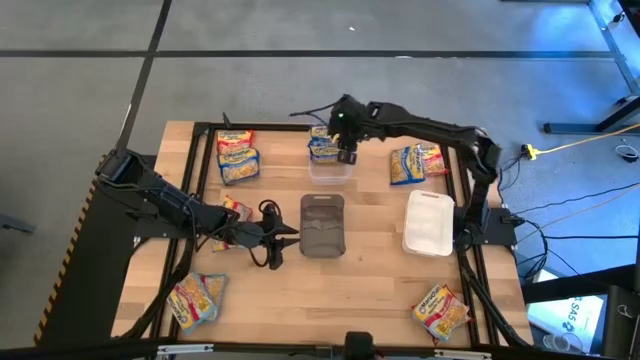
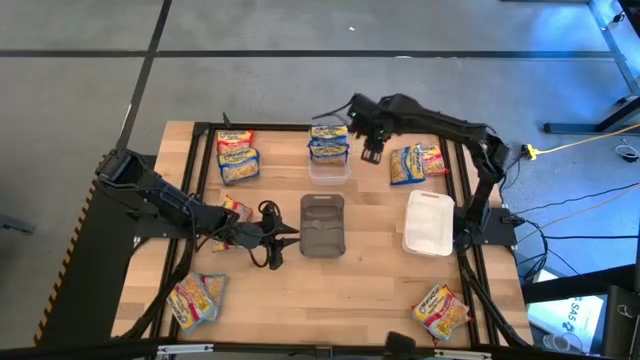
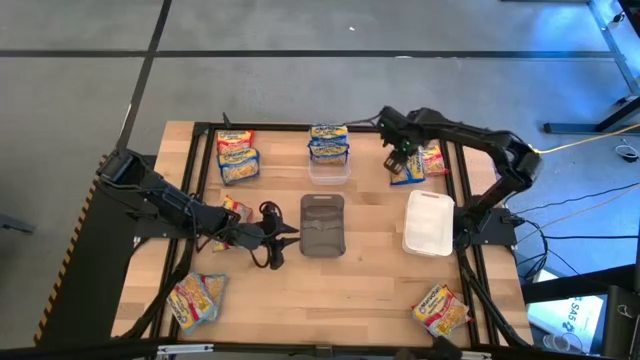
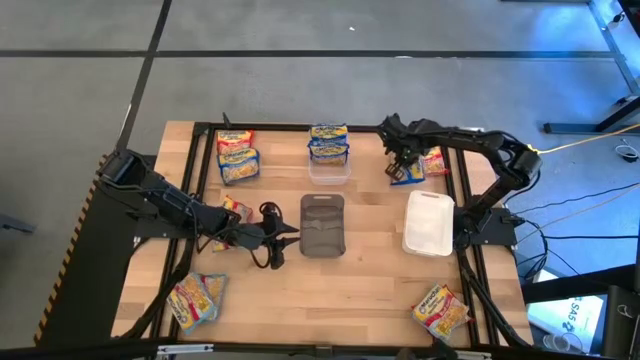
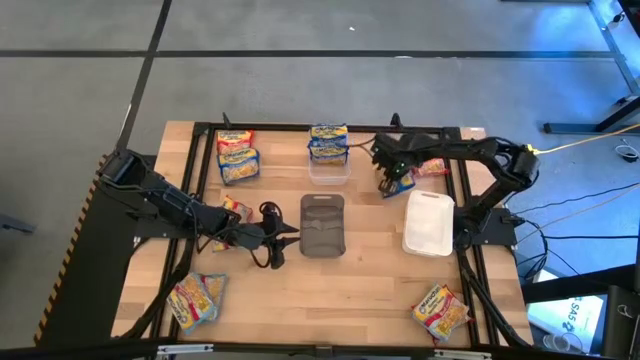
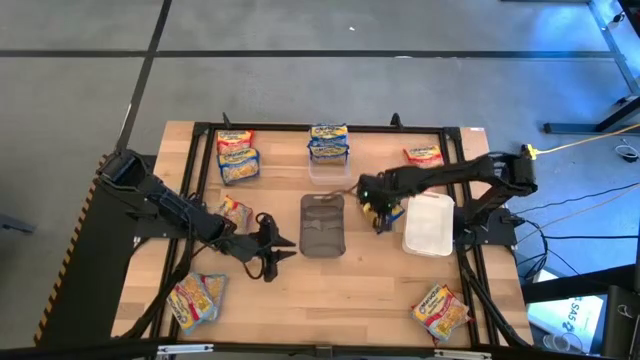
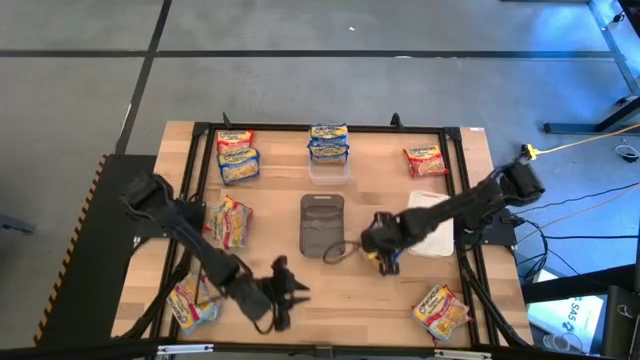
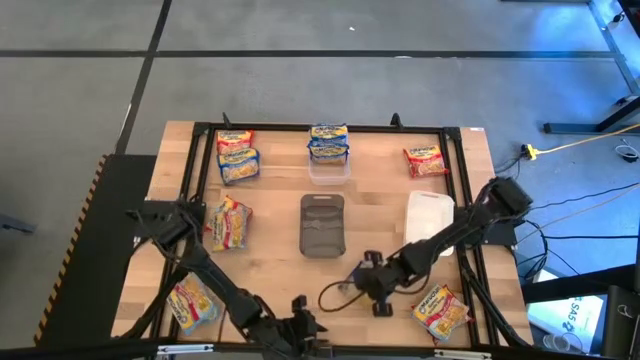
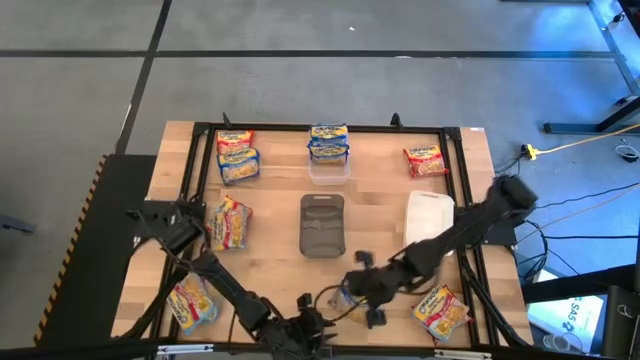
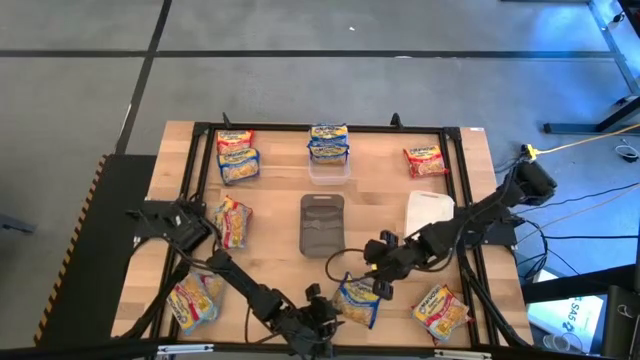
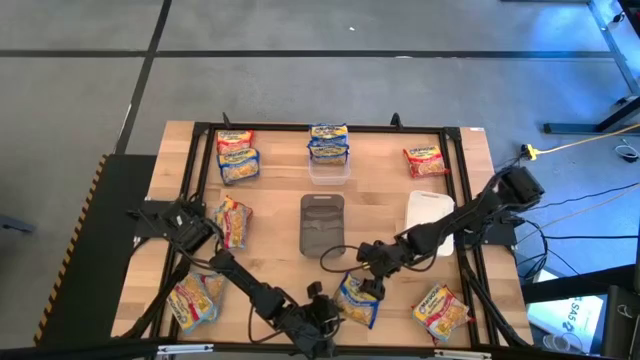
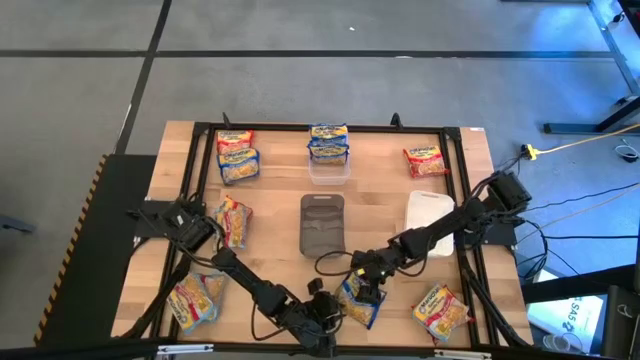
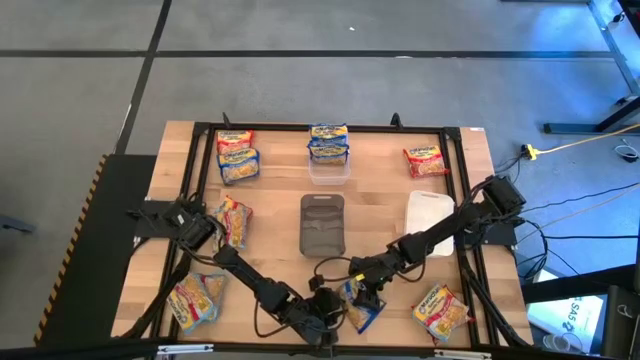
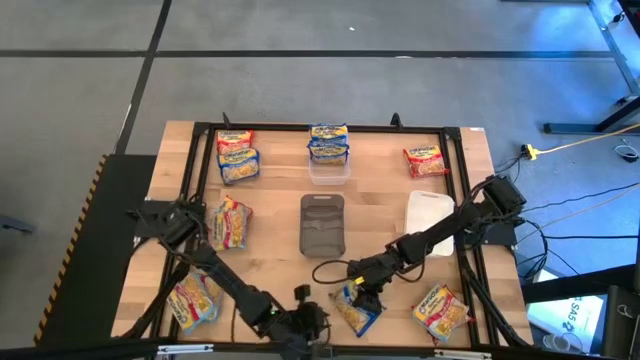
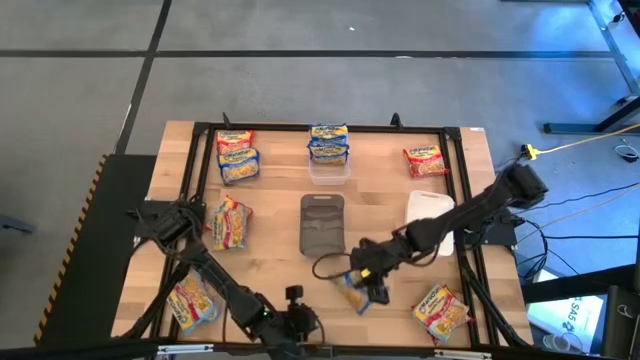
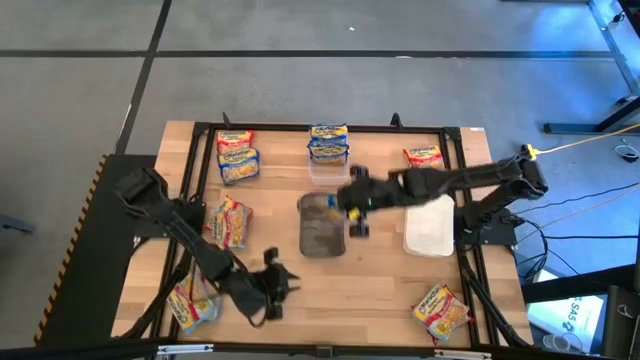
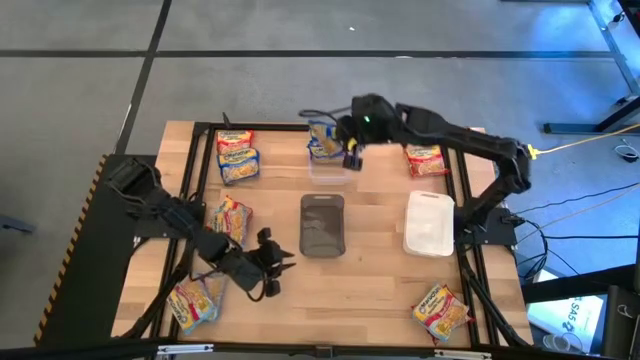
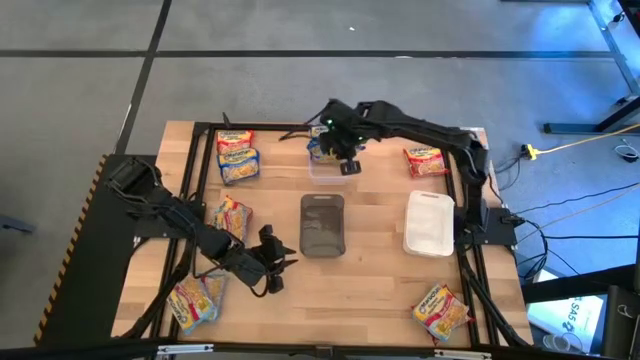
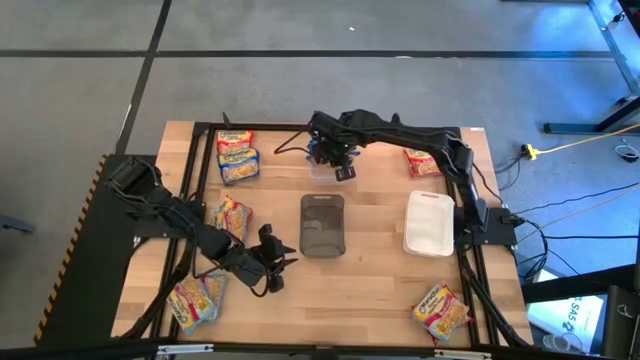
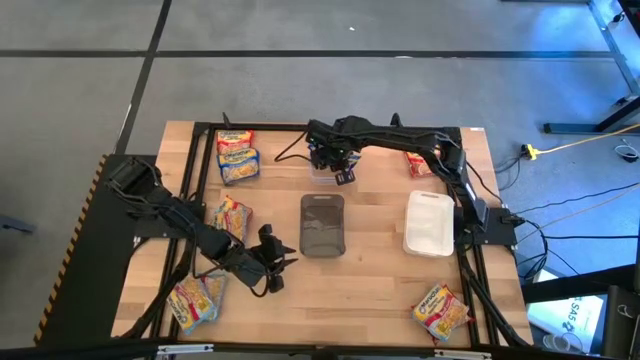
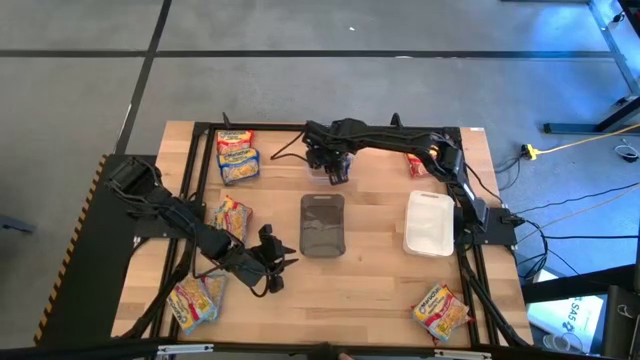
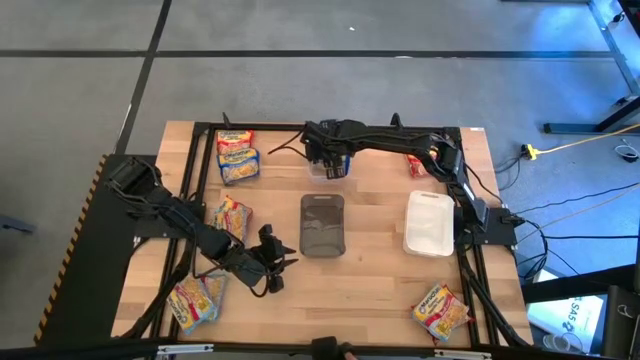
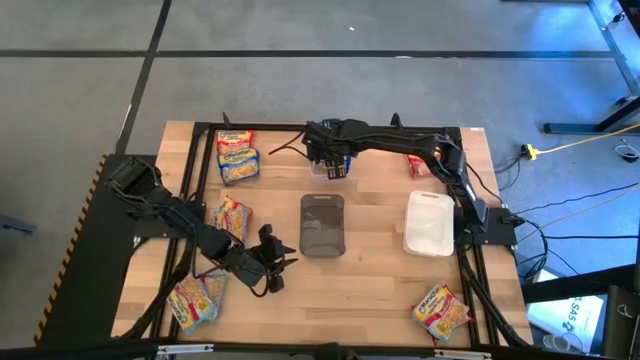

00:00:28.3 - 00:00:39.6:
Task: Sort Maruchan noodles
Put the blue noodle pack into the transparent bin

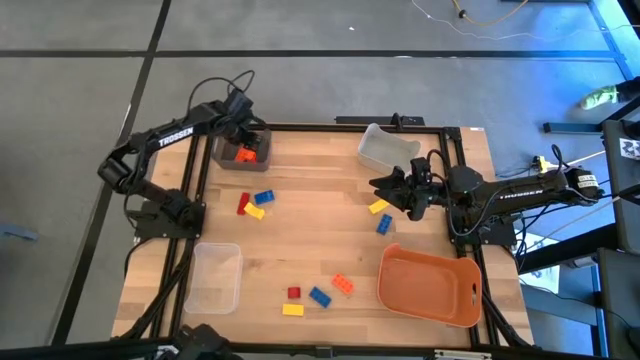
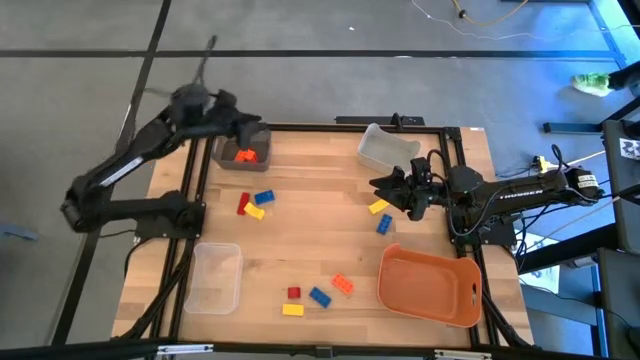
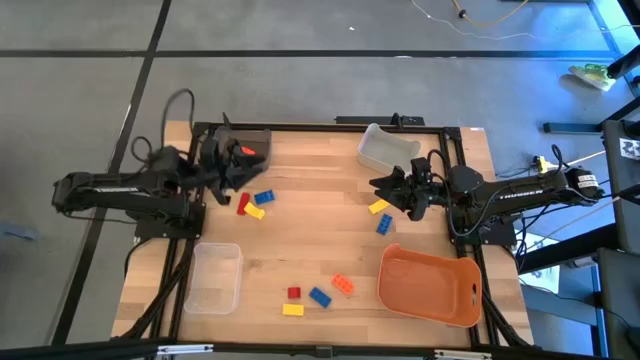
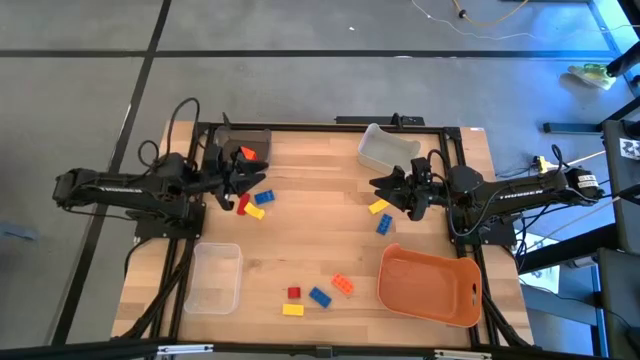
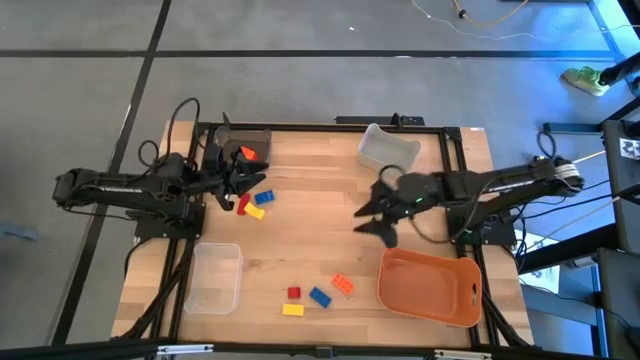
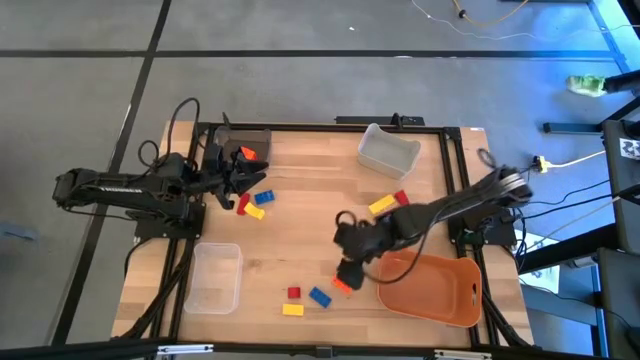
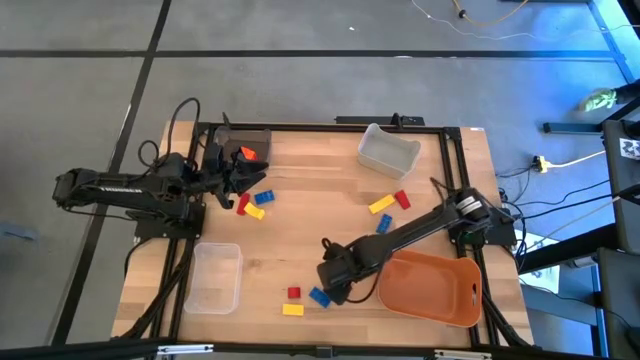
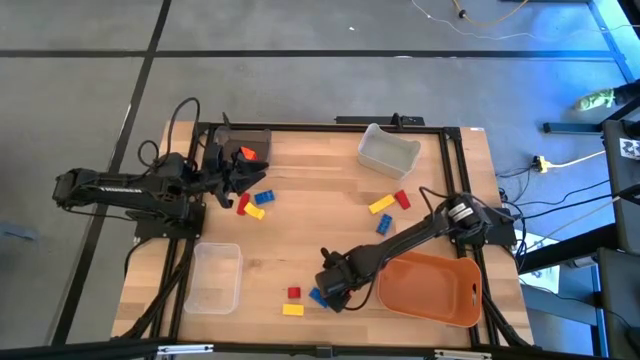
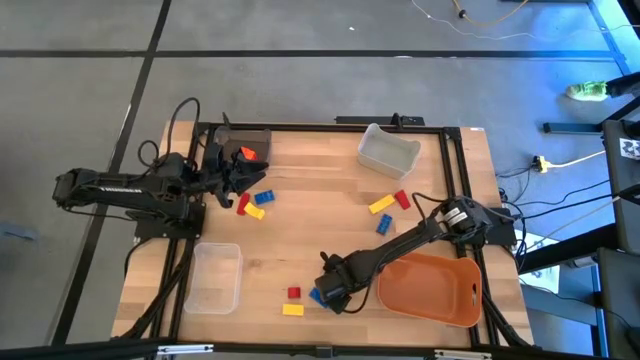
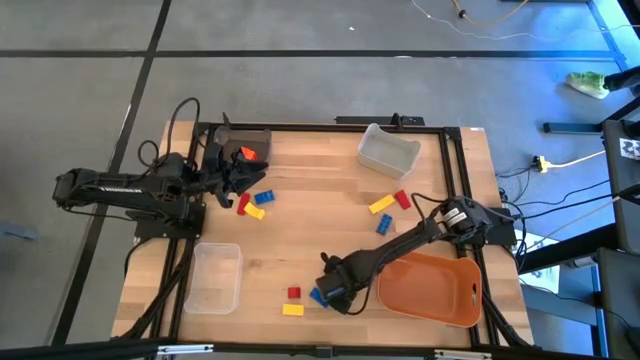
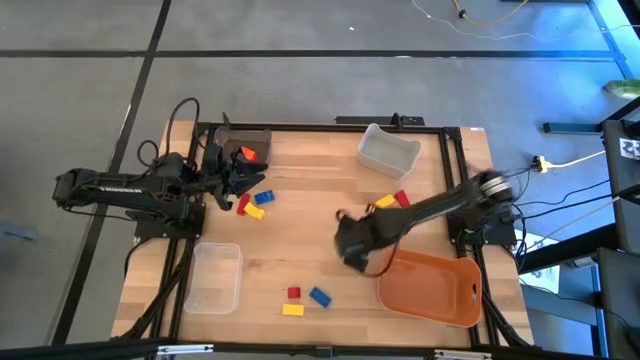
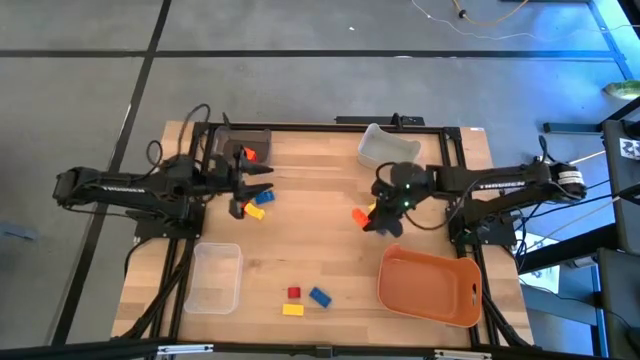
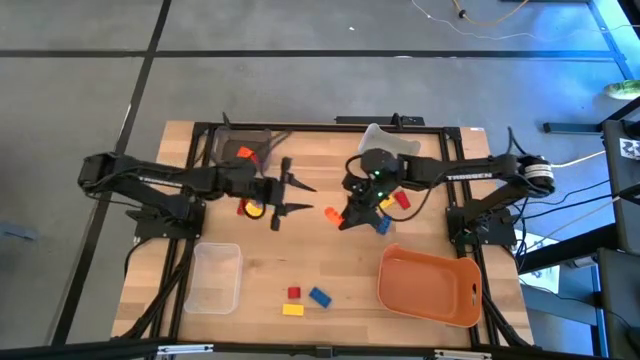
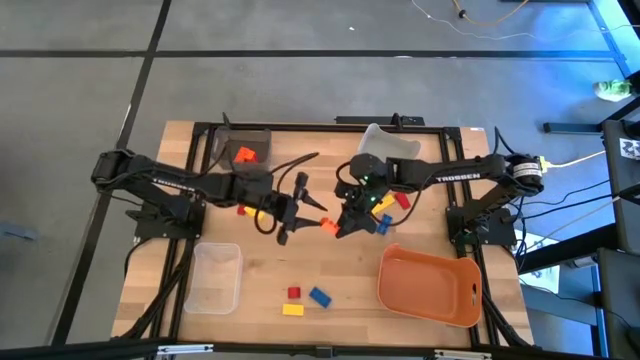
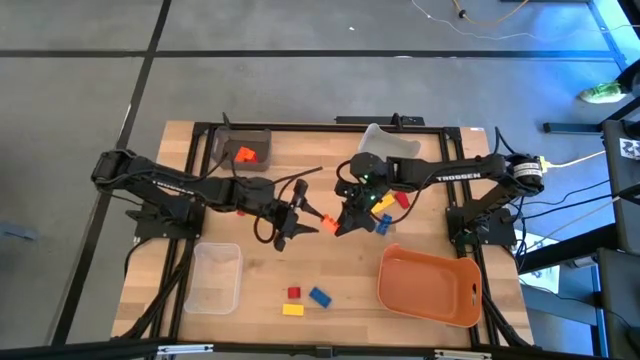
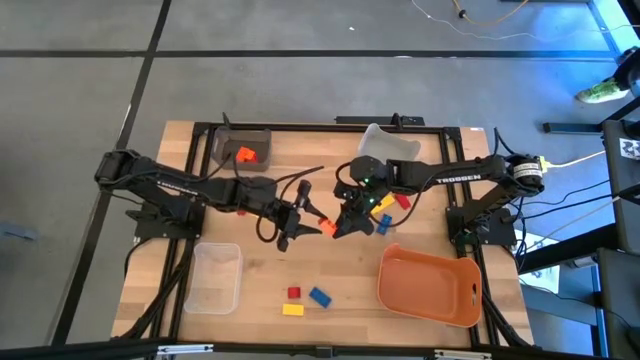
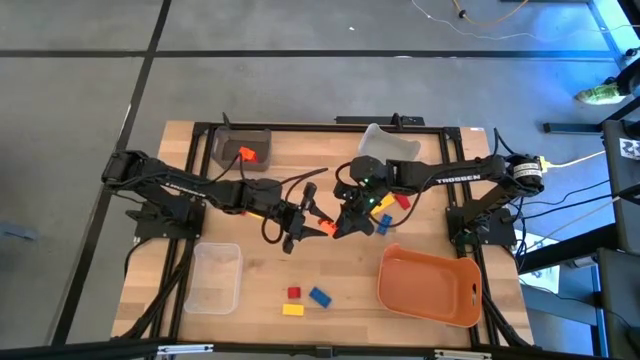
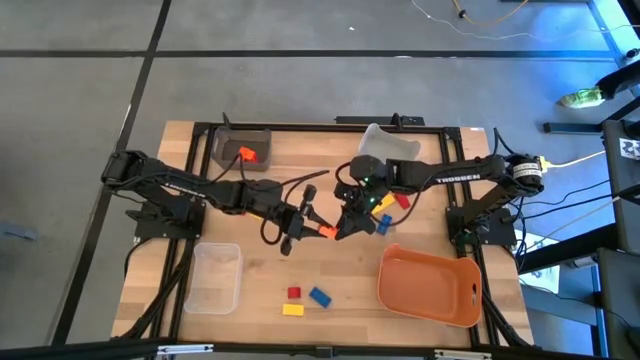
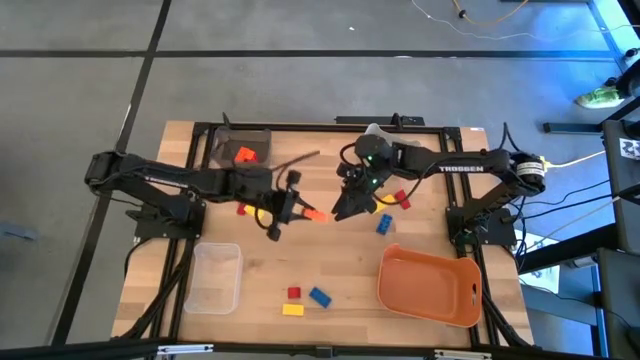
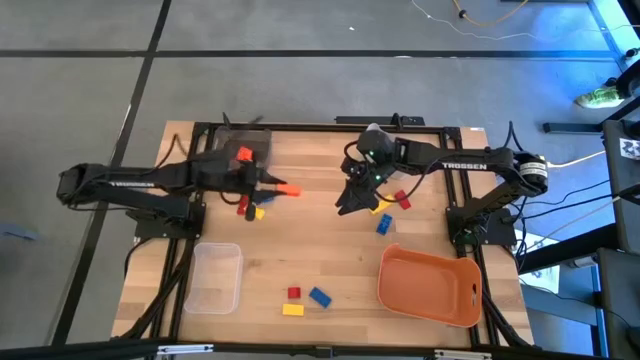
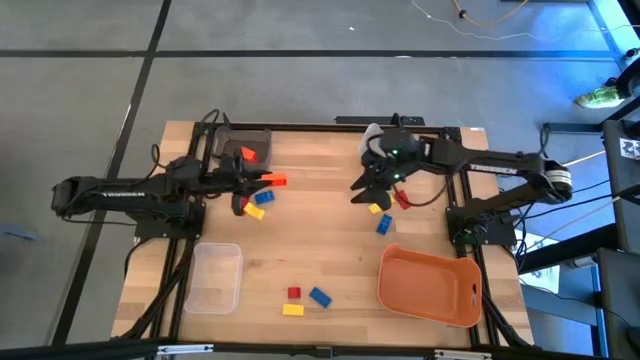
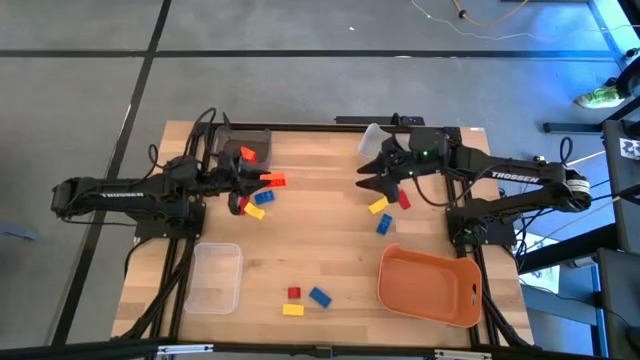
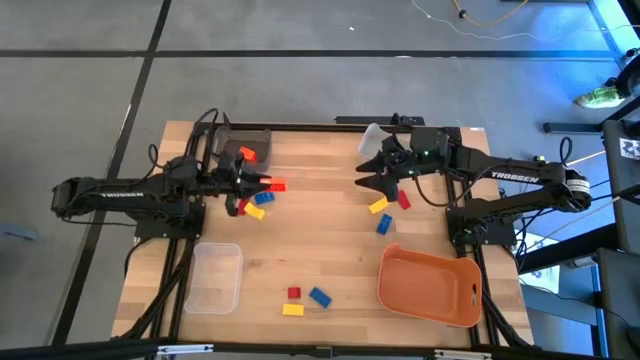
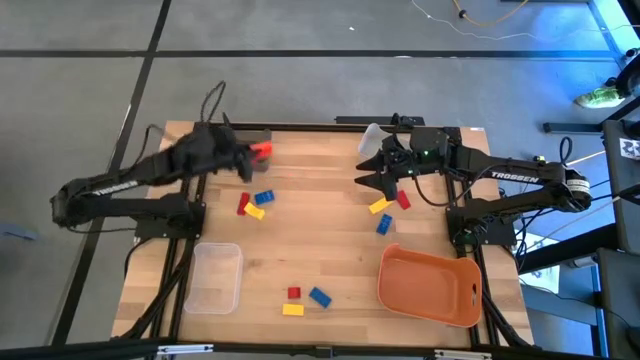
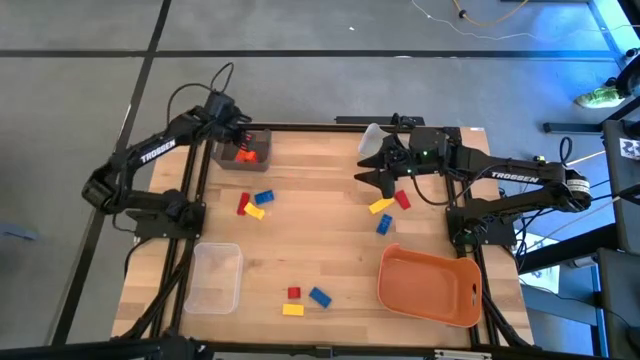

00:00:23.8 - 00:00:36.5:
Task: Sort & place blocks by color
Put the orange gamepiece into the black bin
